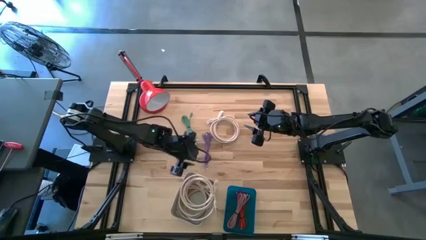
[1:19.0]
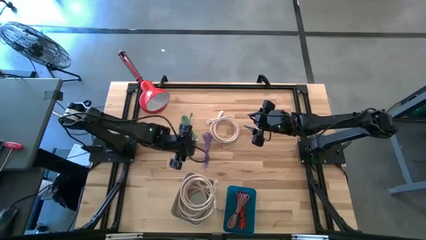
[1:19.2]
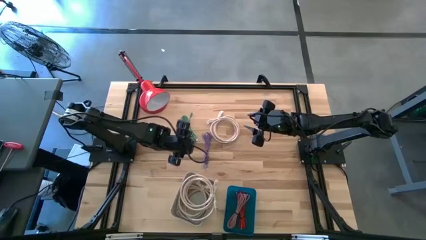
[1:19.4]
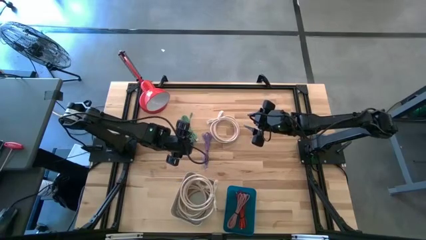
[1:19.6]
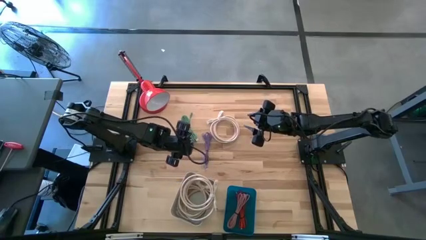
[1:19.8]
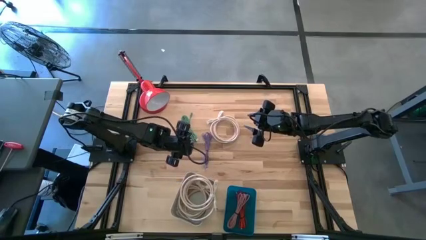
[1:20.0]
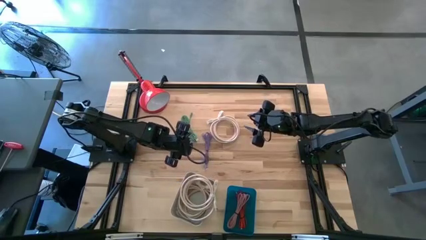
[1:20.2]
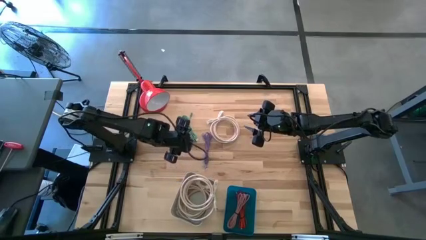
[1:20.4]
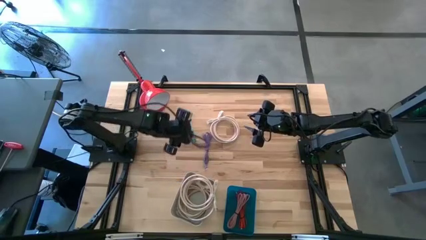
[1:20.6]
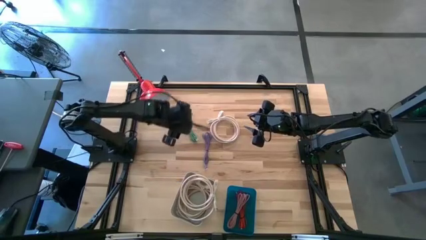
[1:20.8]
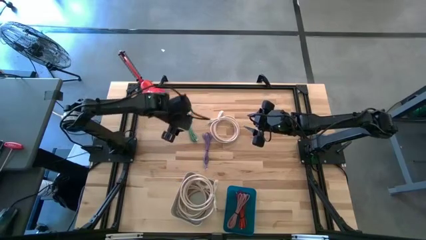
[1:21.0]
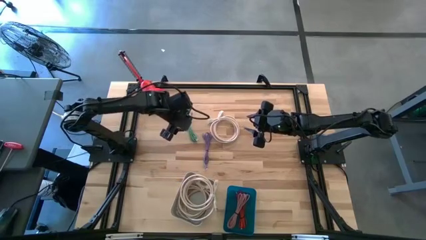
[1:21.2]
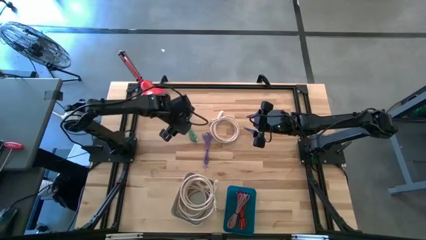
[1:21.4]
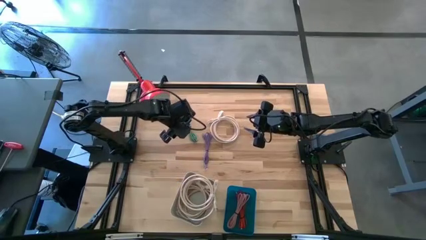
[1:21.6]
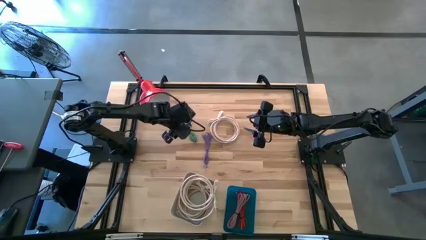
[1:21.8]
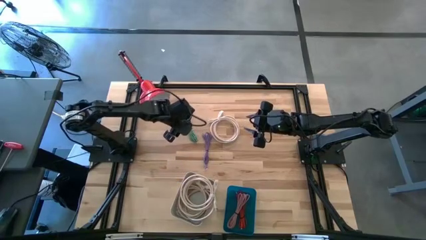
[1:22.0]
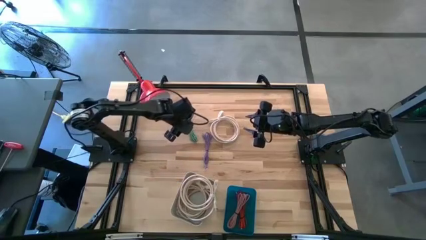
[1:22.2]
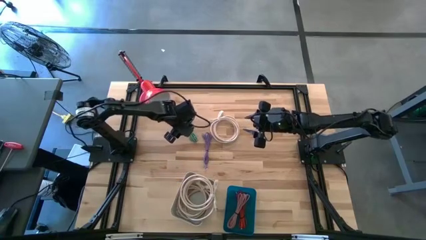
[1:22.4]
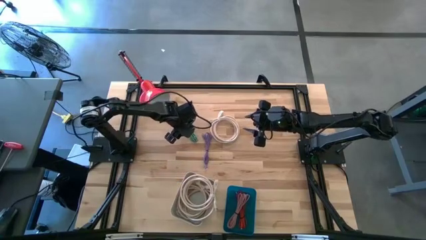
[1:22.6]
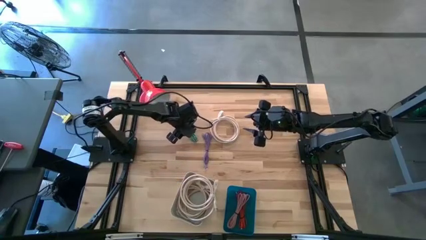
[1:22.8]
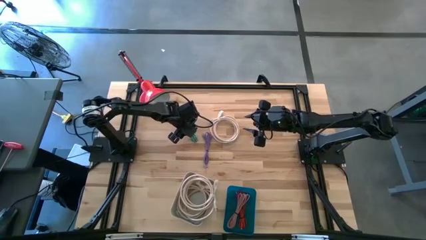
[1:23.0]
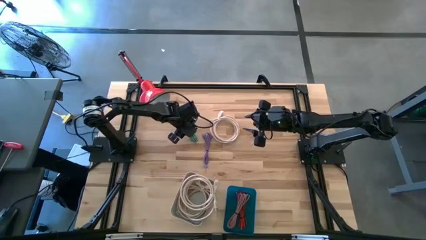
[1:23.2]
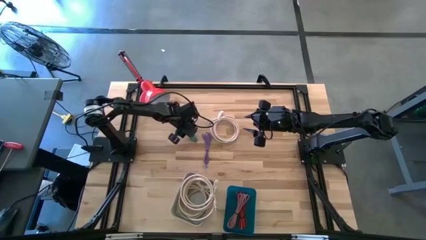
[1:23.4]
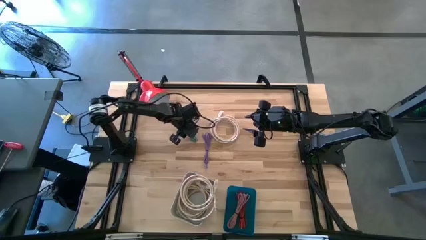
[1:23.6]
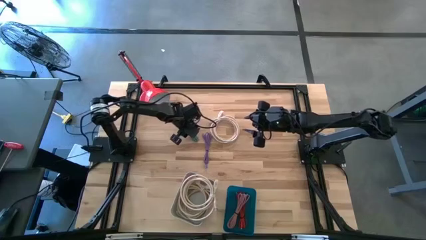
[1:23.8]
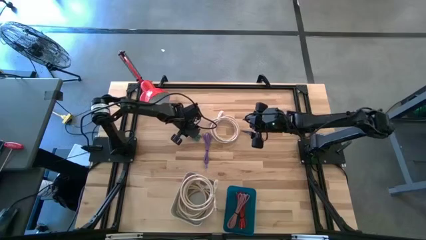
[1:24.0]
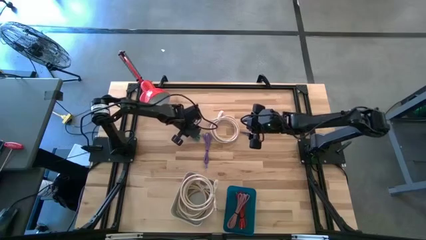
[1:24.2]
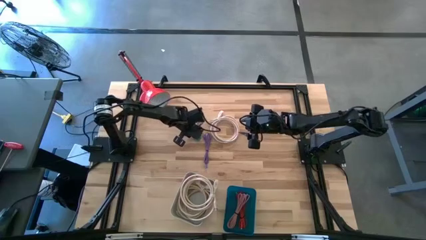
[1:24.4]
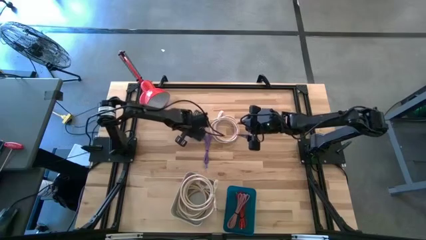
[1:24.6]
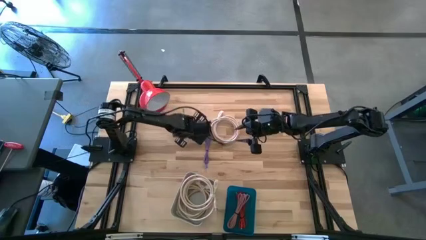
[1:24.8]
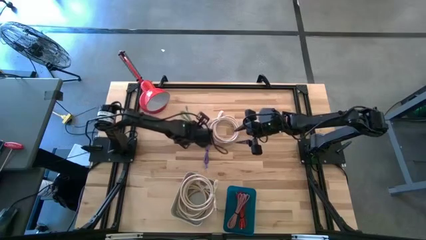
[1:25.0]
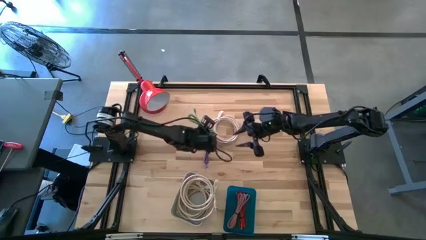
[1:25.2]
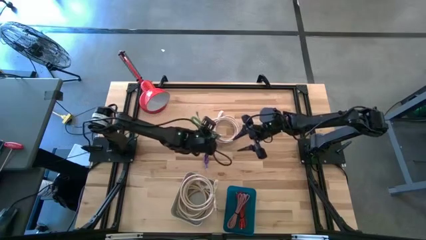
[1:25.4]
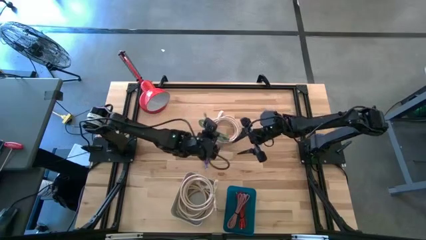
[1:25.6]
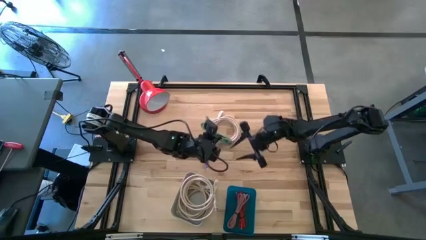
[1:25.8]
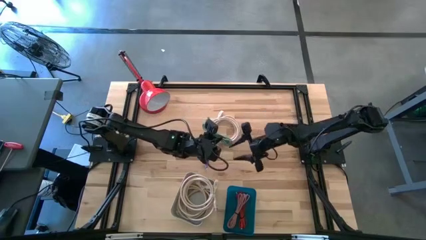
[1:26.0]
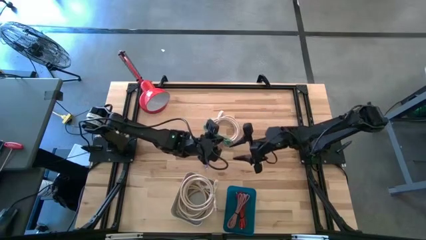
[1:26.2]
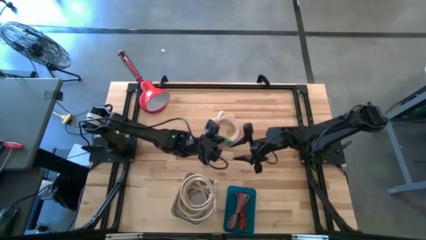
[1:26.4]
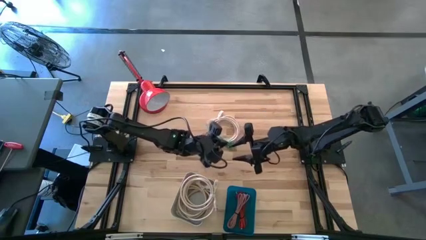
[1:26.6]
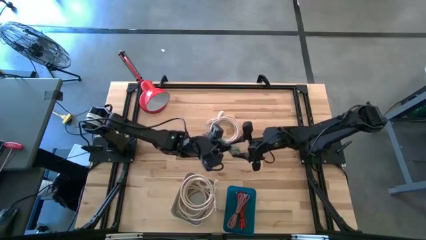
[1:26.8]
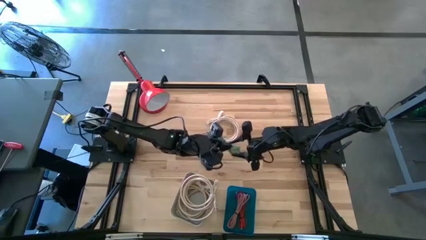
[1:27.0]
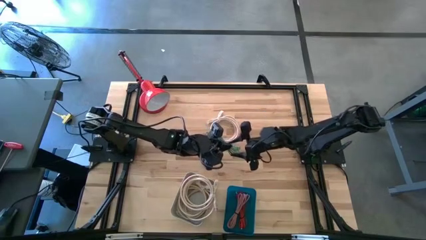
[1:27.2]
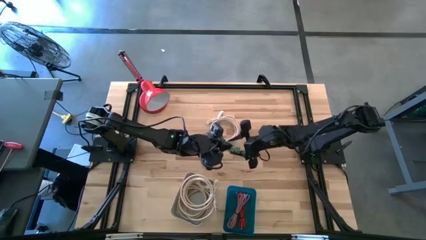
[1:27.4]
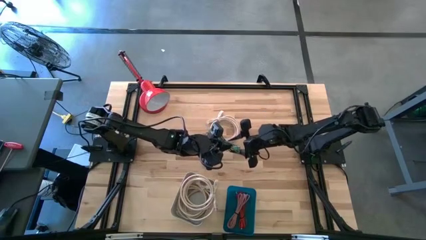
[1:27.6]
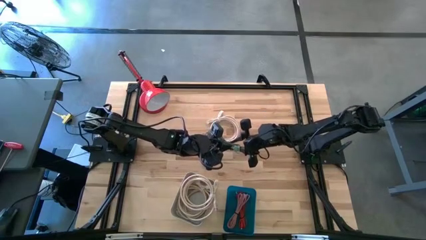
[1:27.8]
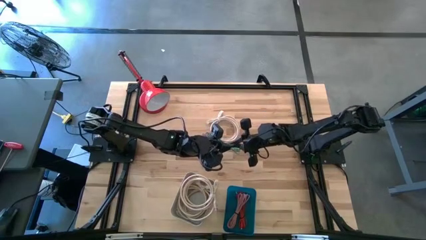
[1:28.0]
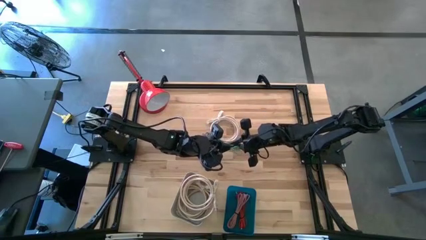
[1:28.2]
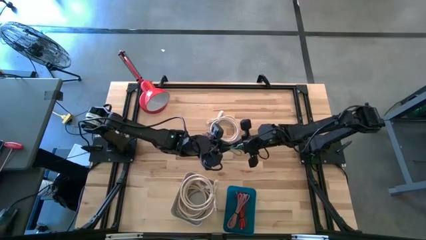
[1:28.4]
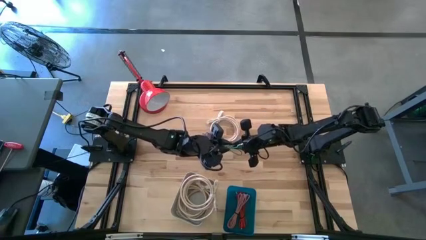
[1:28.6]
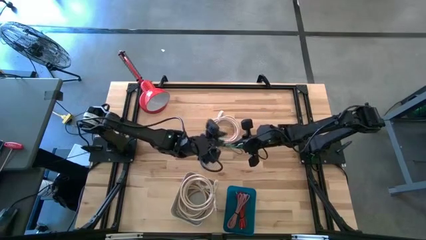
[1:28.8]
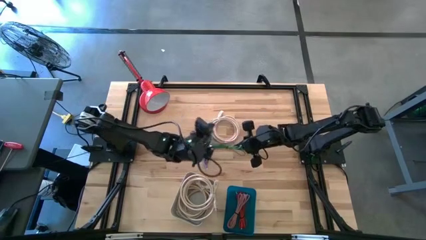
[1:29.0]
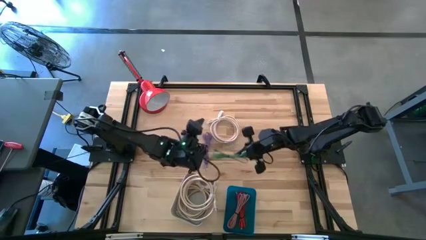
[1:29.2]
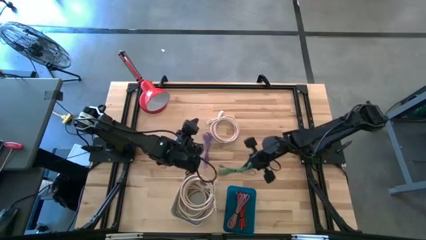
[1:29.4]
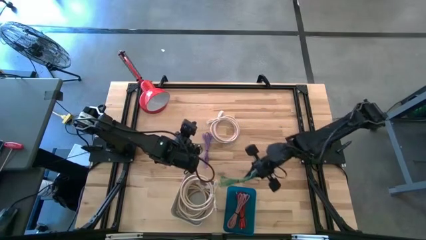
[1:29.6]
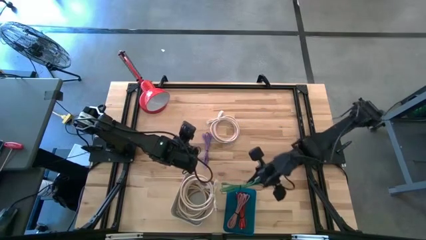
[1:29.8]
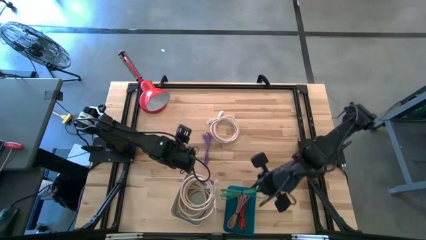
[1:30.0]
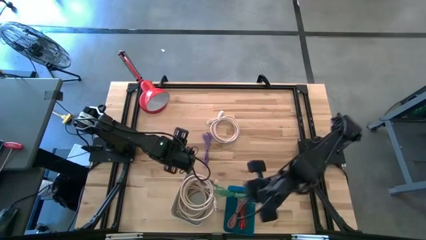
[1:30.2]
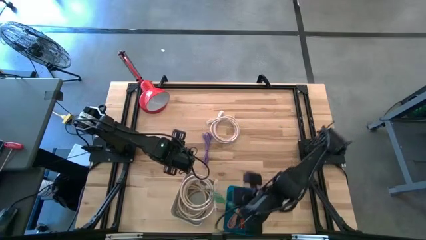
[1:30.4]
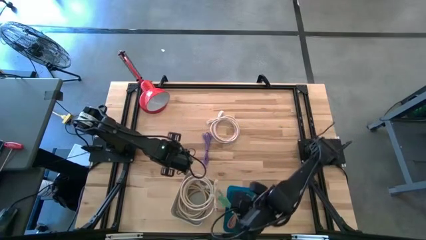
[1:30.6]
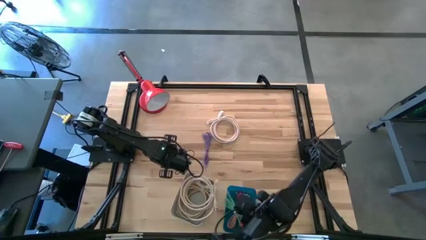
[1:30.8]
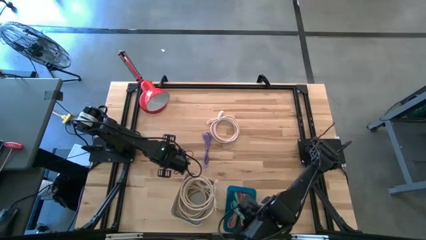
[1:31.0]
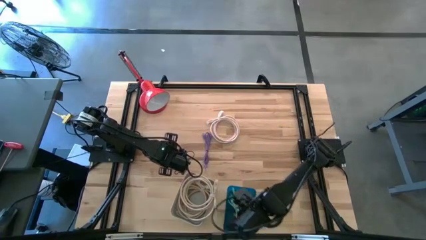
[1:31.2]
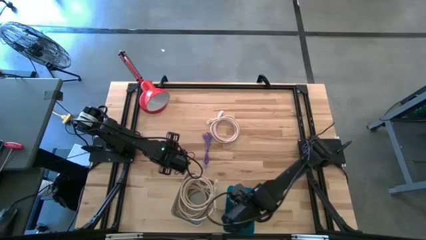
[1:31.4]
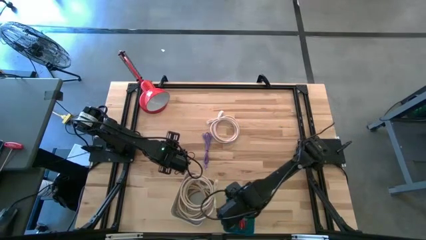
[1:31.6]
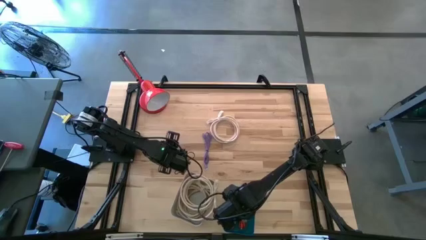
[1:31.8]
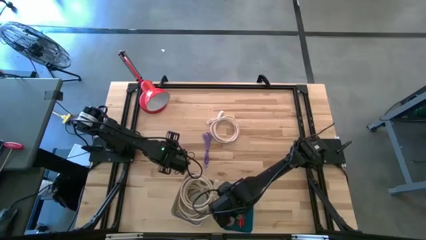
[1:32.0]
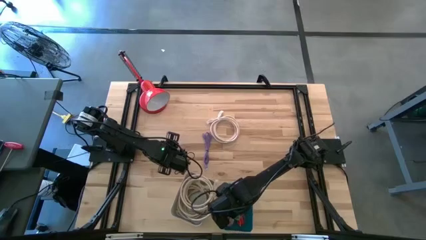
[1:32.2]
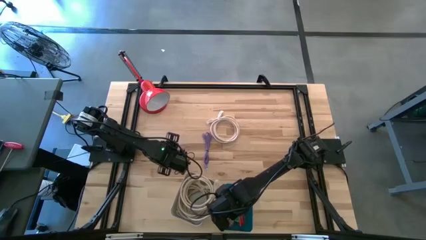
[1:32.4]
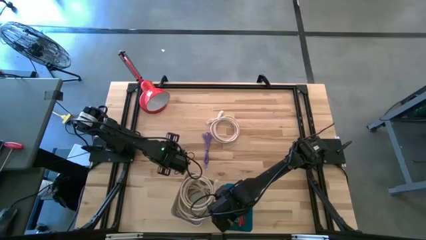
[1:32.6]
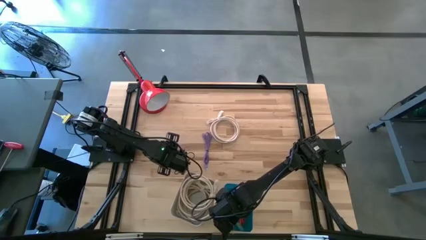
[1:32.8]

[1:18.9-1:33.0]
Task: Pick & Place USB Port
Put the green USB cable into the blue bin

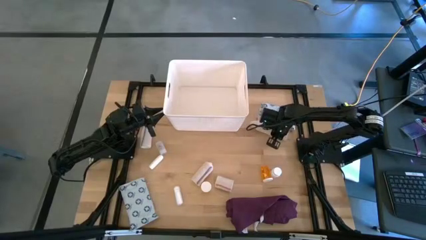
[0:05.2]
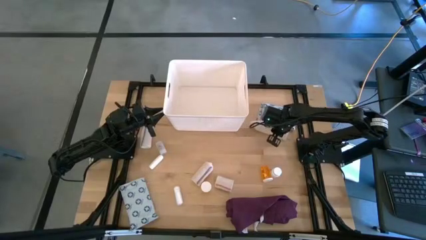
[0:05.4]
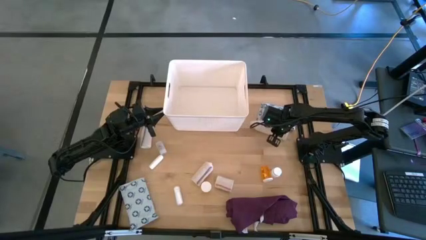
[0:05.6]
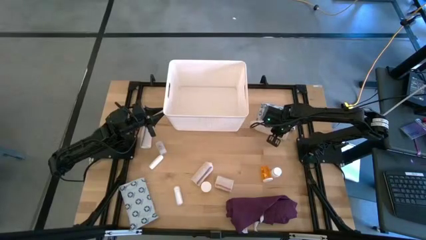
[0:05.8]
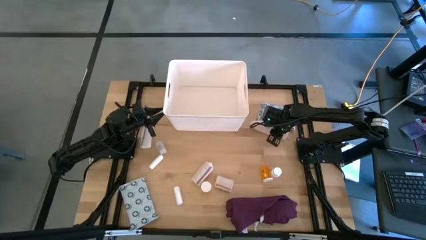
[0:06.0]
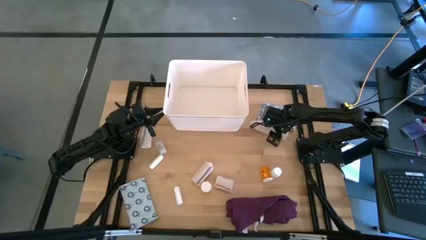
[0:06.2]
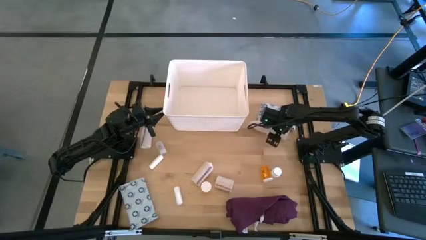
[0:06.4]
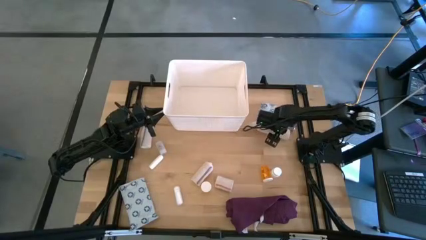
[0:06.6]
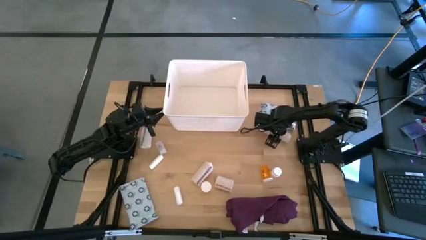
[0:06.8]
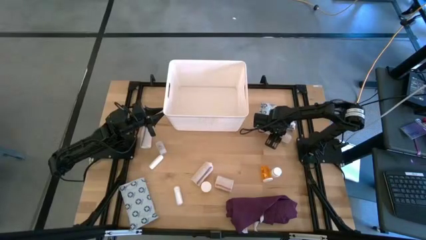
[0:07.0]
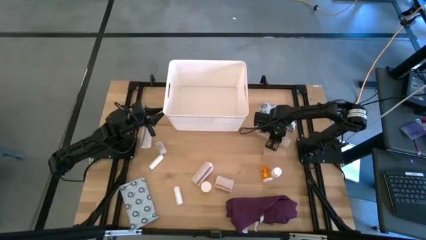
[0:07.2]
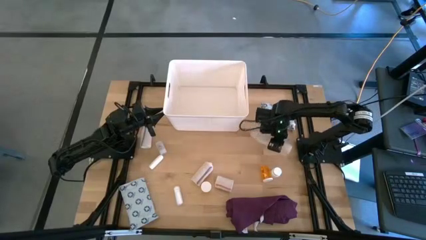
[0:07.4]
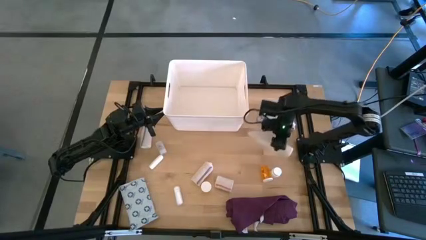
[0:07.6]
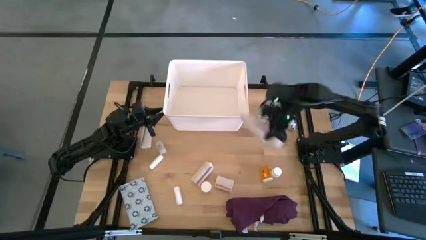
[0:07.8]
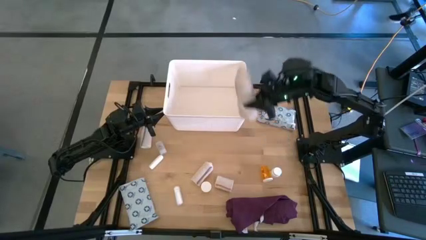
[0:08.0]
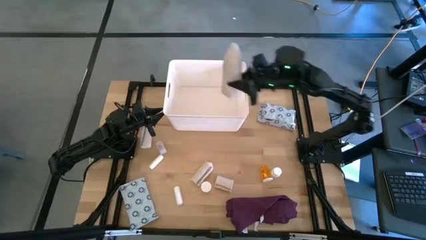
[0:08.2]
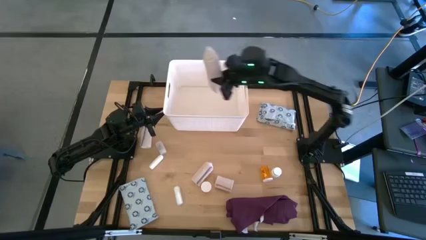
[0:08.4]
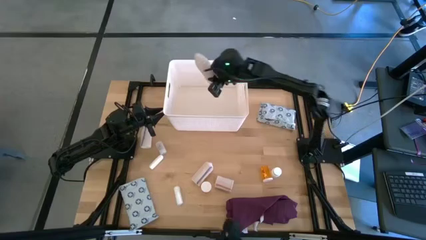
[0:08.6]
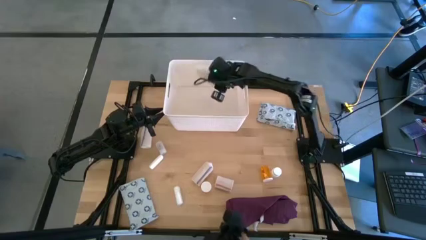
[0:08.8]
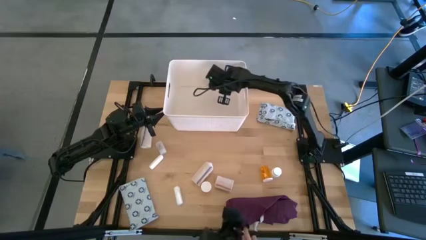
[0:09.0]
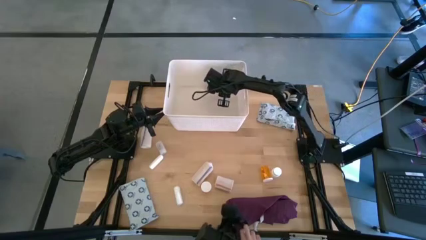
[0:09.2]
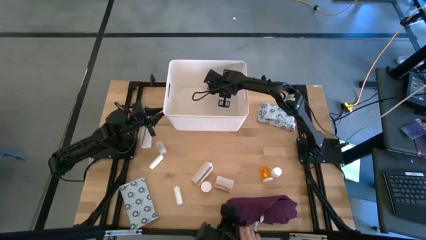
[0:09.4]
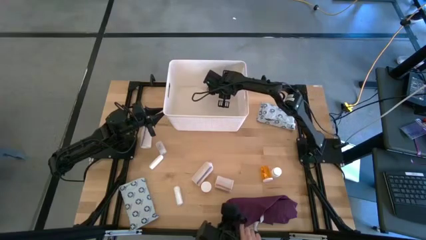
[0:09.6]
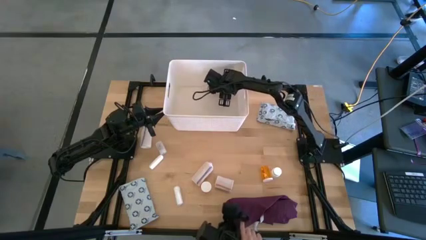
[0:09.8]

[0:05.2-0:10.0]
Task: Pick & place medical supplies in basket/bin
Put the light brown and green bandage into the white bin
